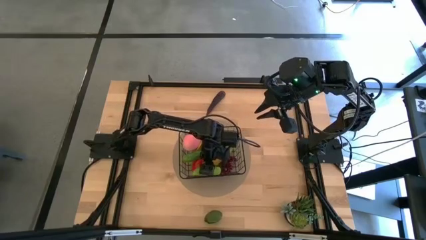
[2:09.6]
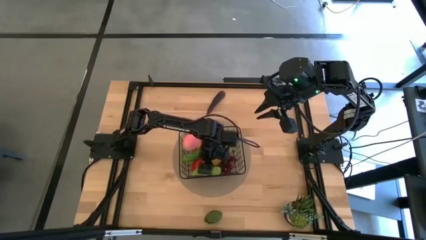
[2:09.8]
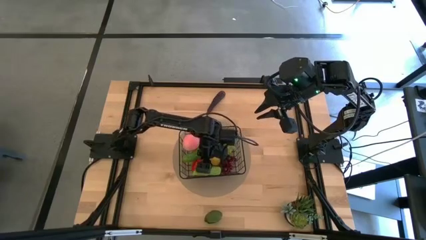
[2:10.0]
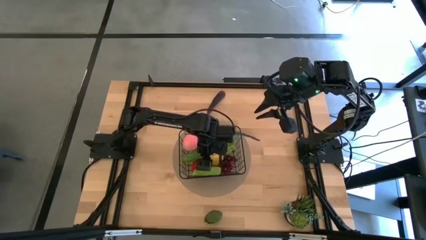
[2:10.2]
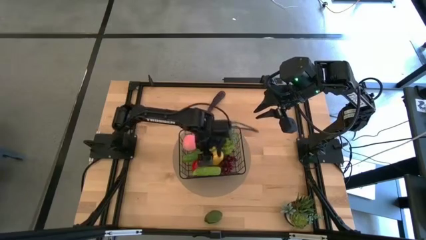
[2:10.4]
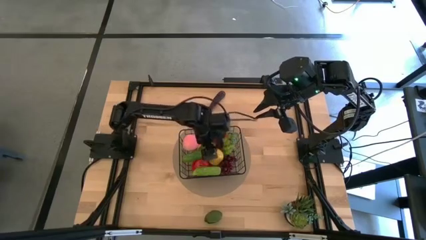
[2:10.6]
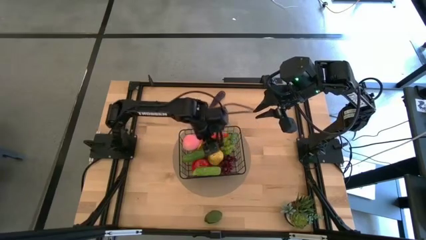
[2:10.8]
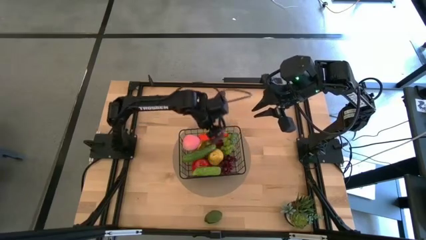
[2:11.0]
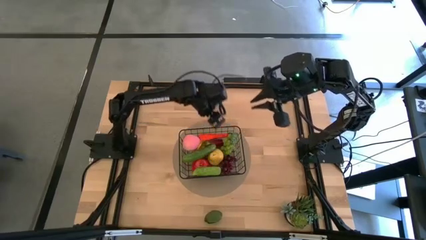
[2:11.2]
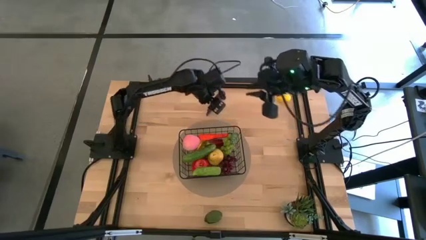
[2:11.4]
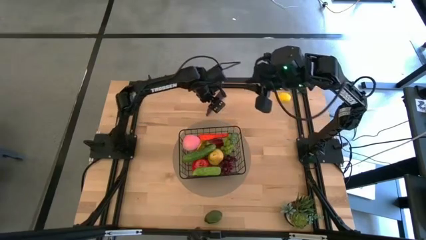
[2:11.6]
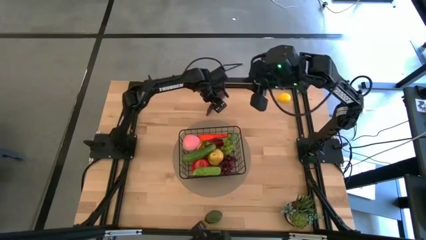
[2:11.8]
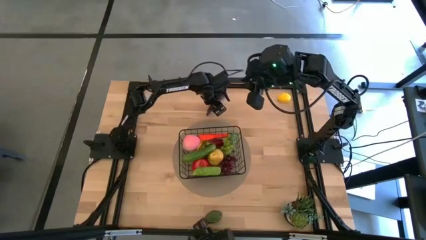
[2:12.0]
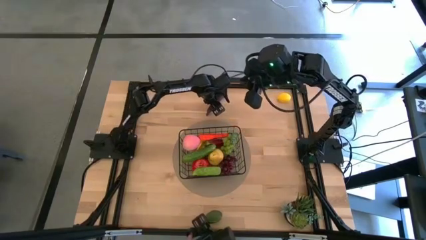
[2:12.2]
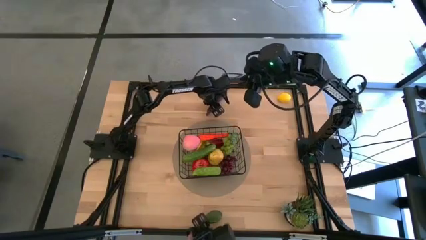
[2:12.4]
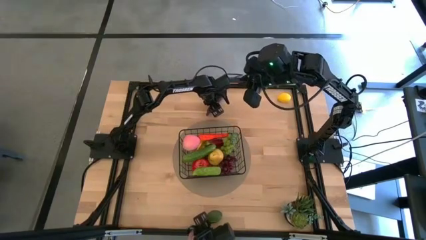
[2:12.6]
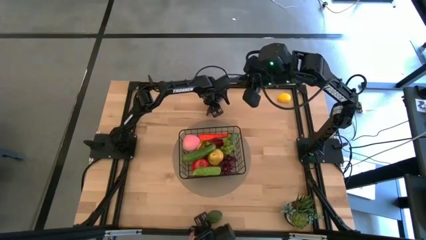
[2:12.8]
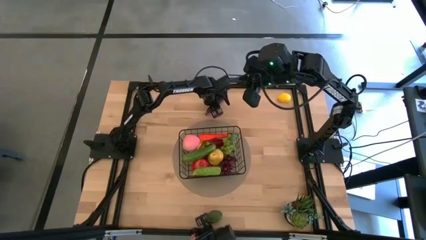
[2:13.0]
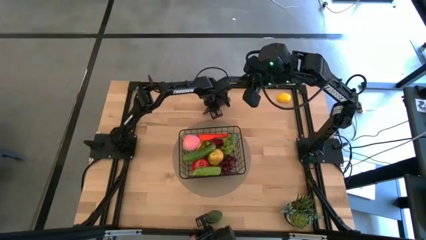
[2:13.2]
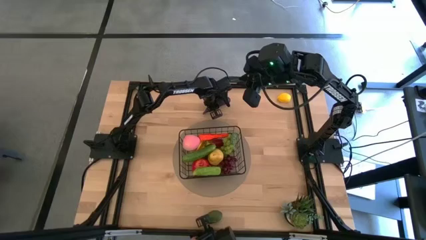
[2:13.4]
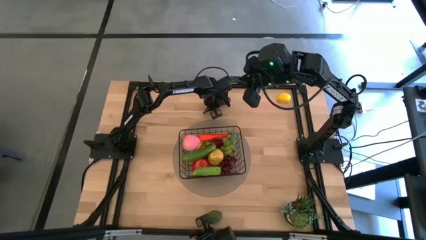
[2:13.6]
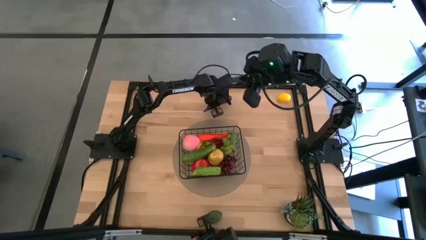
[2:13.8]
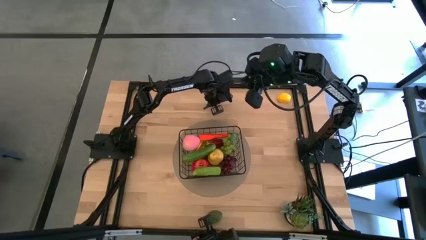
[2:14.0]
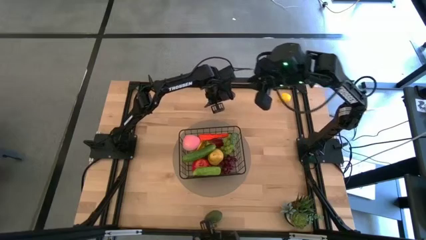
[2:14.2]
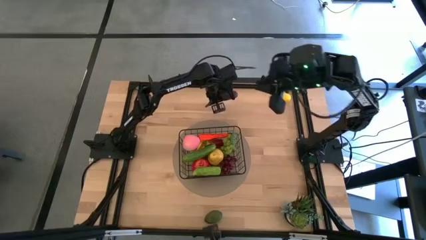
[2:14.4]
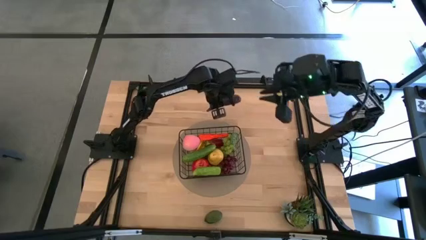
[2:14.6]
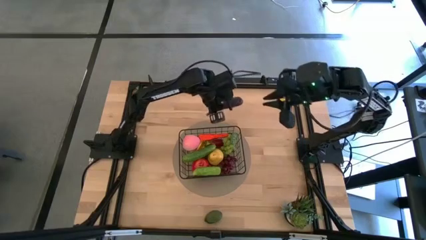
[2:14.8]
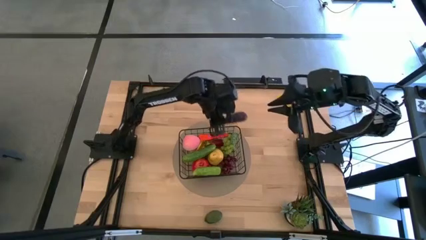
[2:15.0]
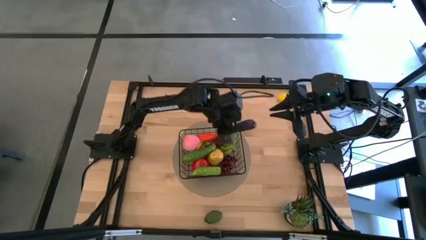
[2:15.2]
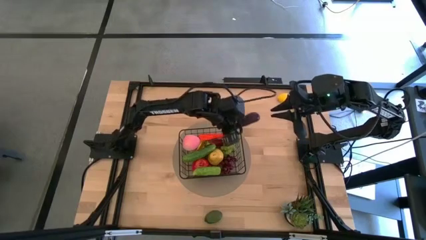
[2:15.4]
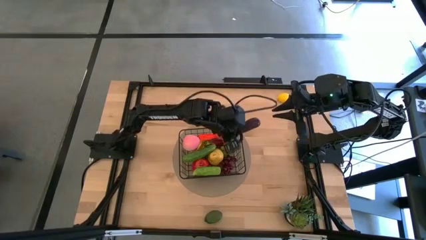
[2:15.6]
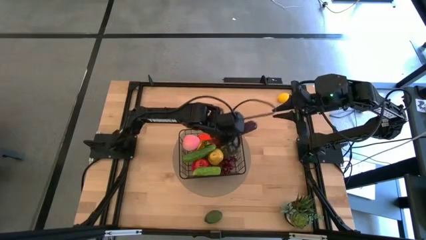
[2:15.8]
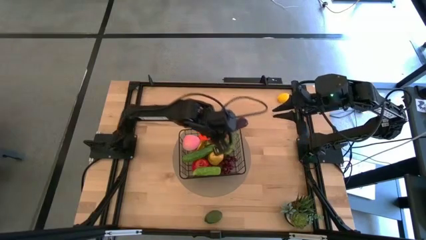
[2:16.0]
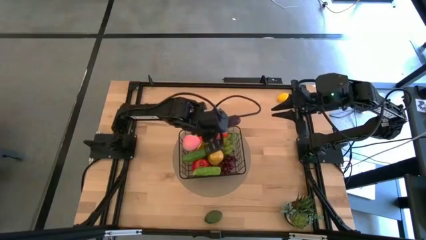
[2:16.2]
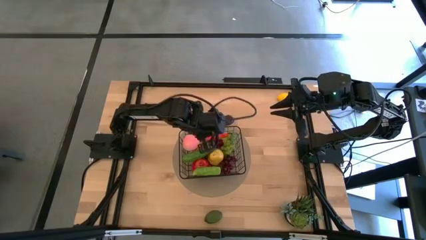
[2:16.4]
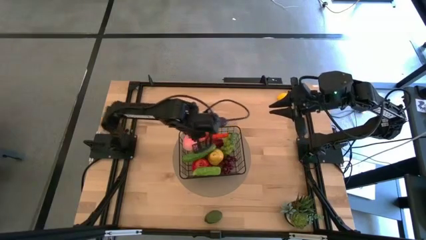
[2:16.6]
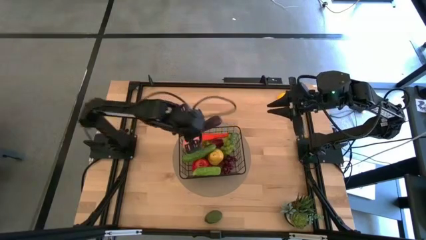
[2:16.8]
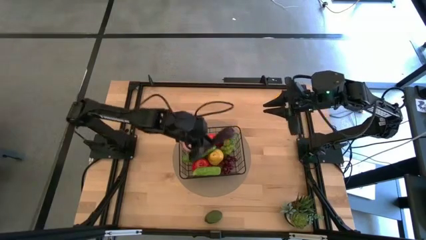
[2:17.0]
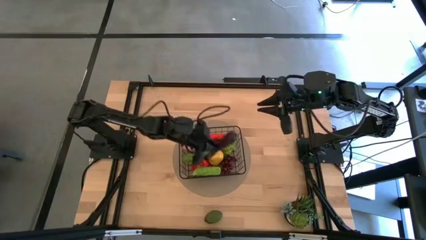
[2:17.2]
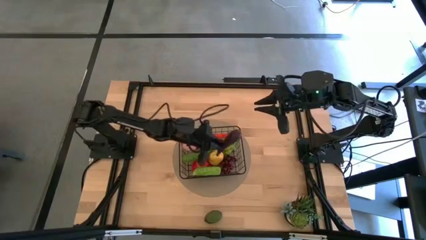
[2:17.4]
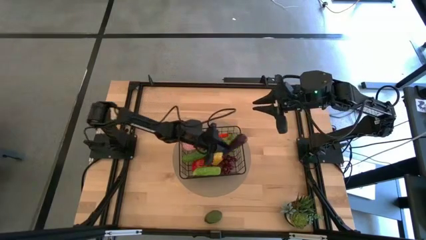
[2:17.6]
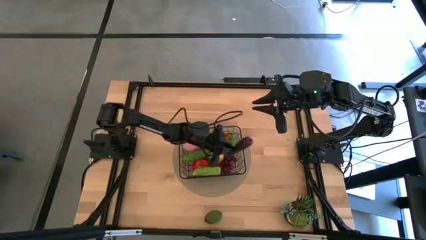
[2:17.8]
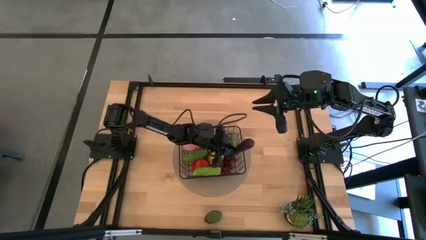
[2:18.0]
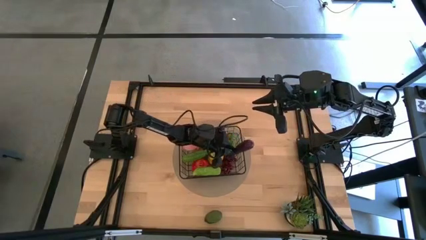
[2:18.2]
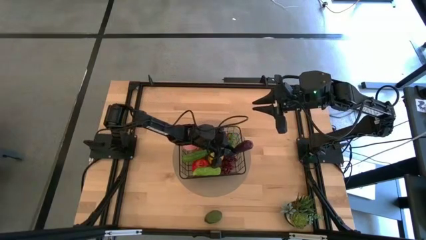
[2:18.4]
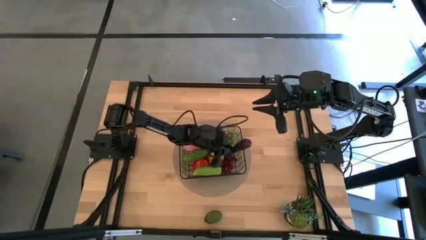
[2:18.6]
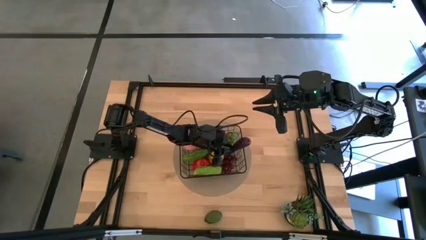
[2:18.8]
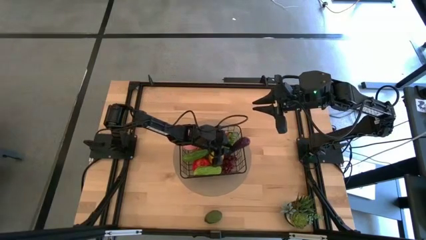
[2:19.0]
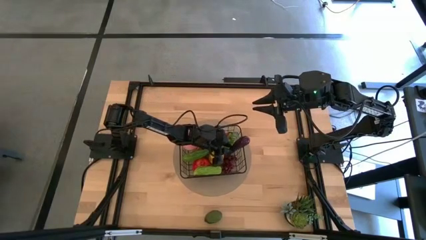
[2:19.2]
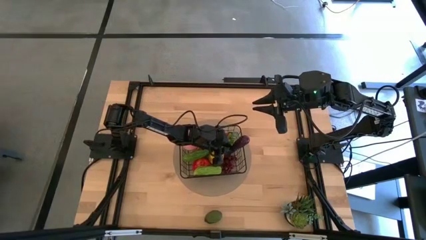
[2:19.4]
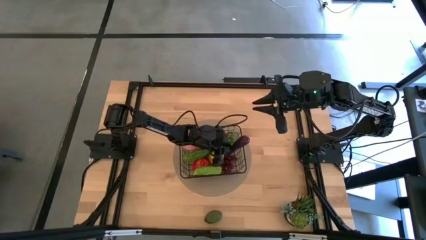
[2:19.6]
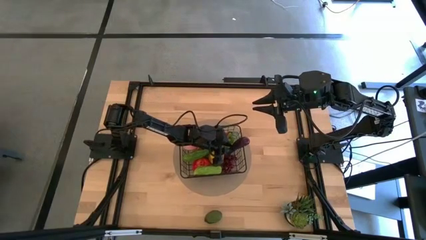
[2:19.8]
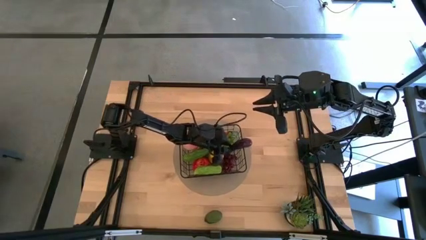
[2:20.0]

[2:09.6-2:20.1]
Task: Build produce basket
Put the purple eggplant into the black wire basket

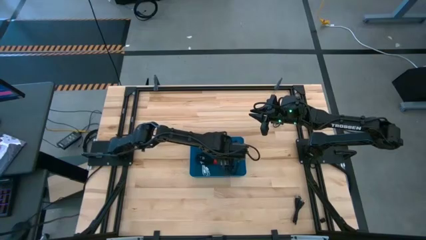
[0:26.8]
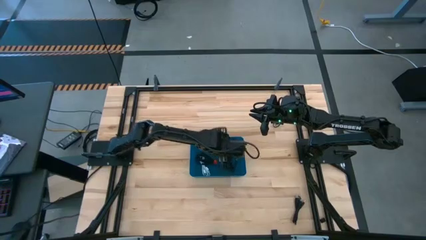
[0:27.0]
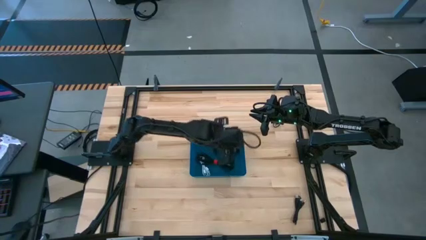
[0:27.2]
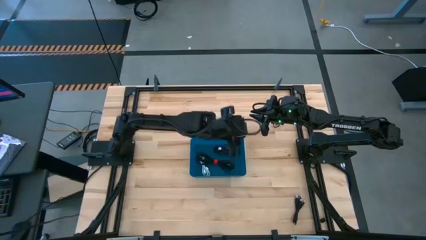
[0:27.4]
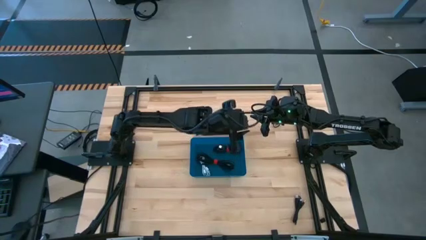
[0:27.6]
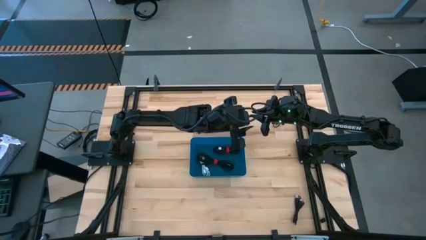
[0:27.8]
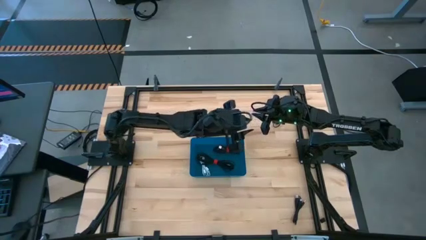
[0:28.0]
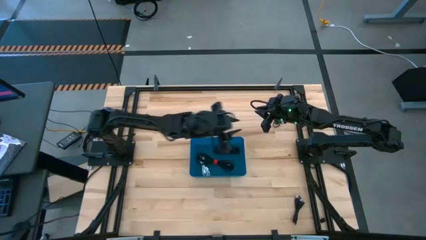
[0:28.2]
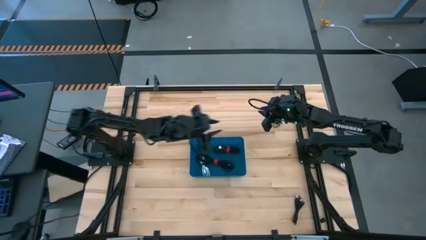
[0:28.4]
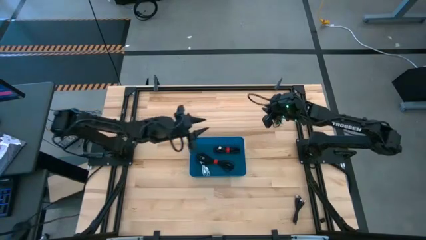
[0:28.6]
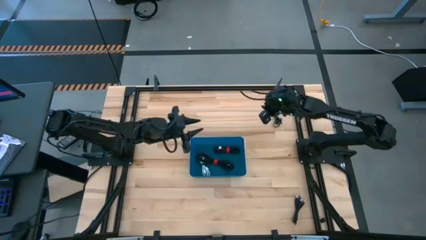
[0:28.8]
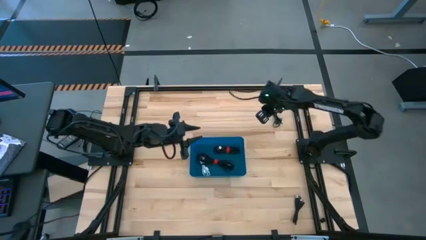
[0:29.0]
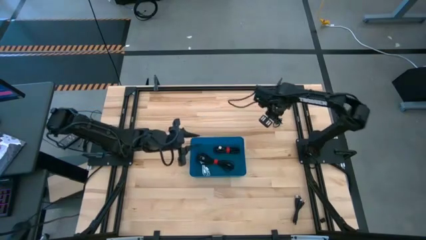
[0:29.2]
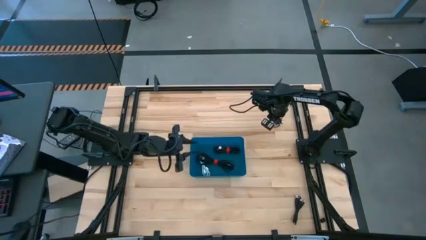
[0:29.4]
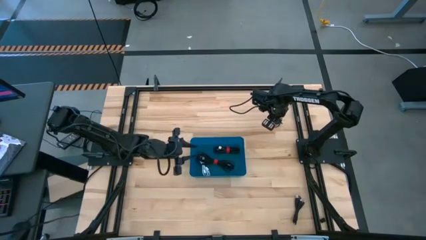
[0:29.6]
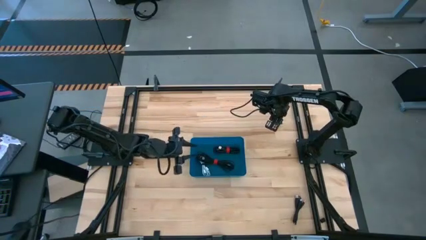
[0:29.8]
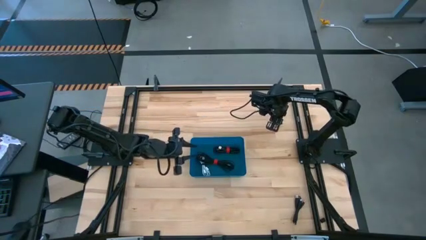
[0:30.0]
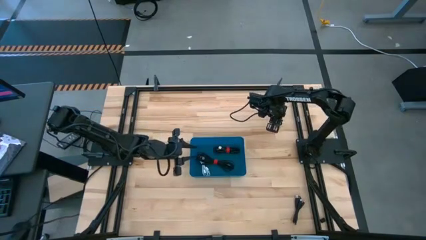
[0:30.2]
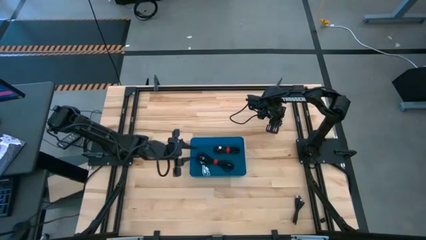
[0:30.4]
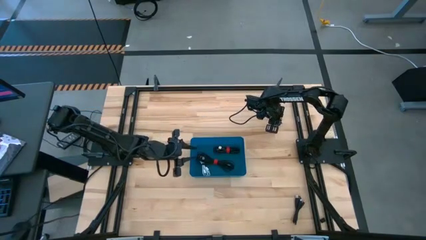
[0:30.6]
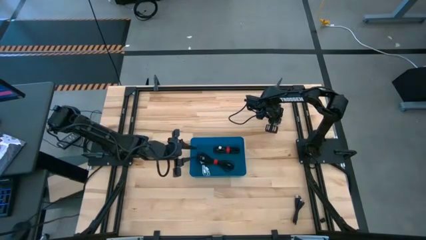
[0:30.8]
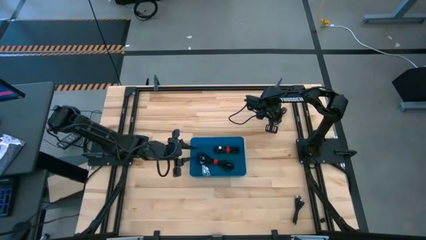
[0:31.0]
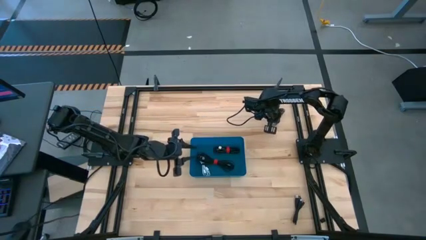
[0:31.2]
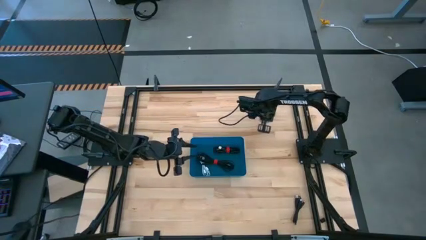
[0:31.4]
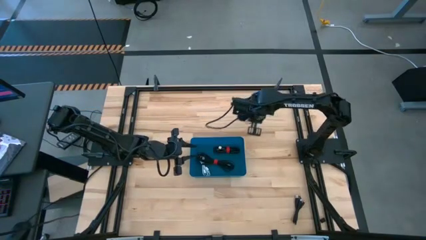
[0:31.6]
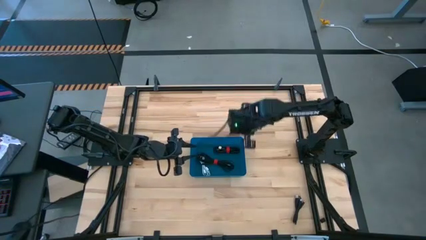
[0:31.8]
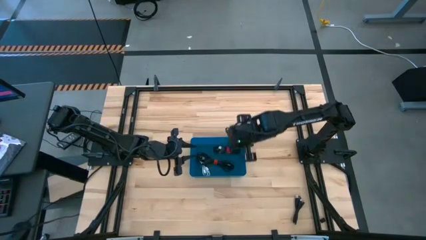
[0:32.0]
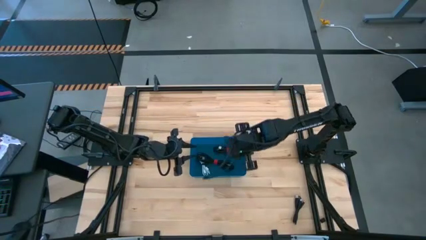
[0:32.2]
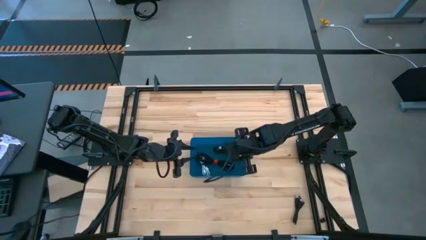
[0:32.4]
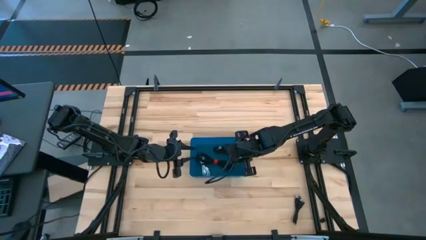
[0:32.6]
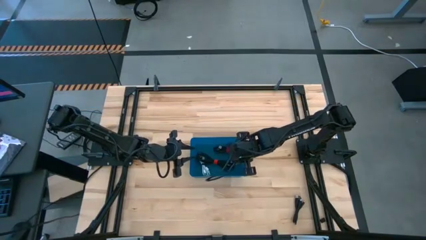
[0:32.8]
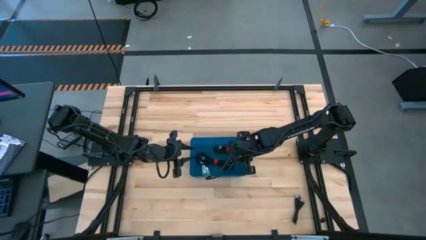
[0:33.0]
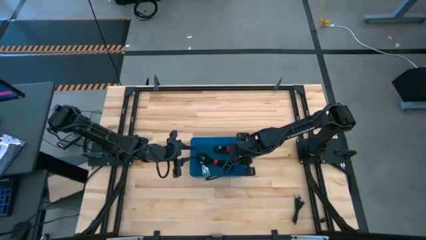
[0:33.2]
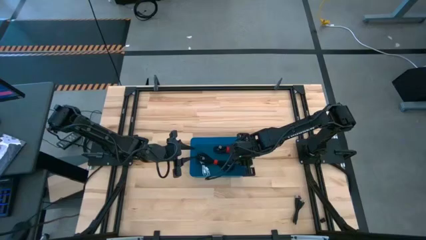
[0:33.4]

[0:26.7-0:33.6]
Task: Pick and place USB-C Cables
Put the charger cable into the blue bin
